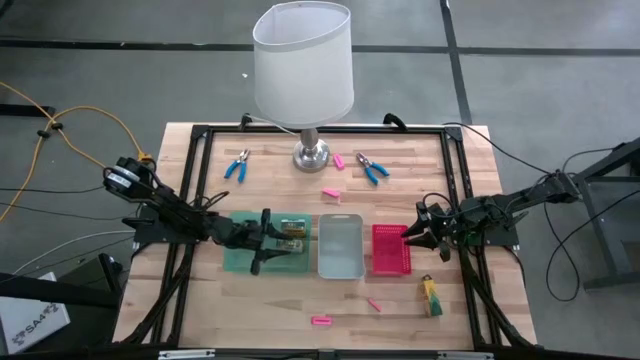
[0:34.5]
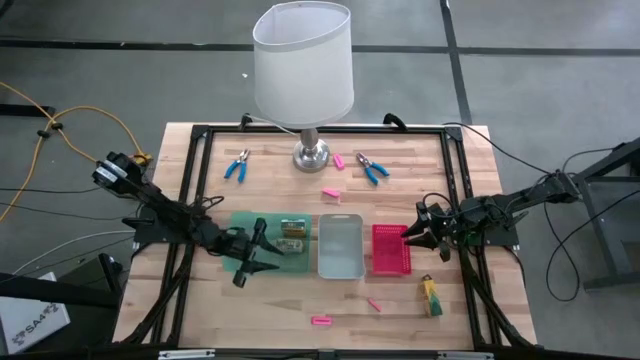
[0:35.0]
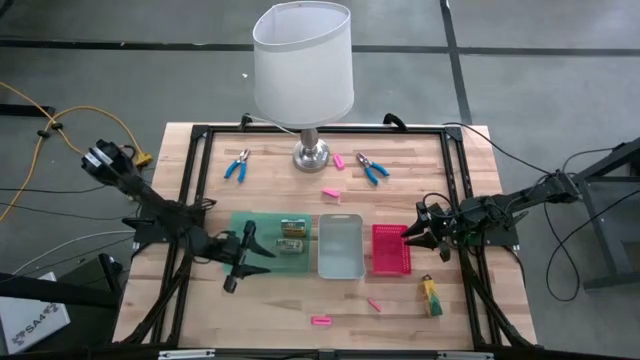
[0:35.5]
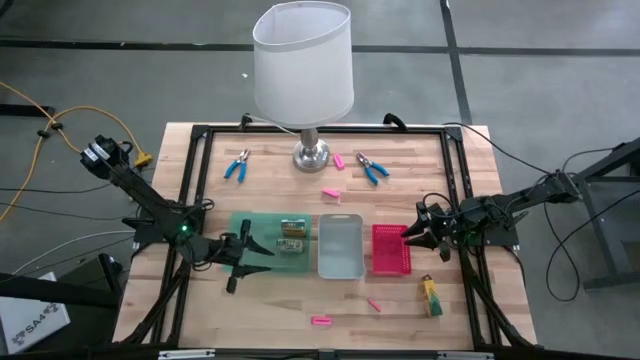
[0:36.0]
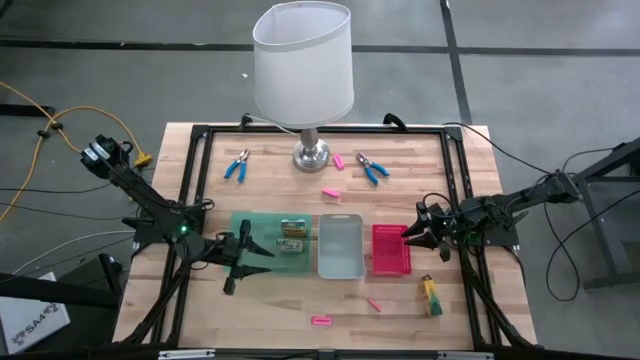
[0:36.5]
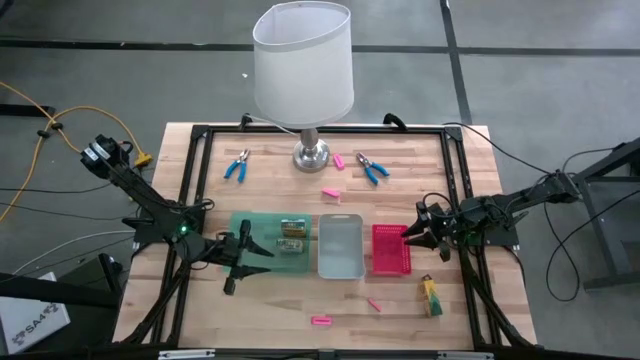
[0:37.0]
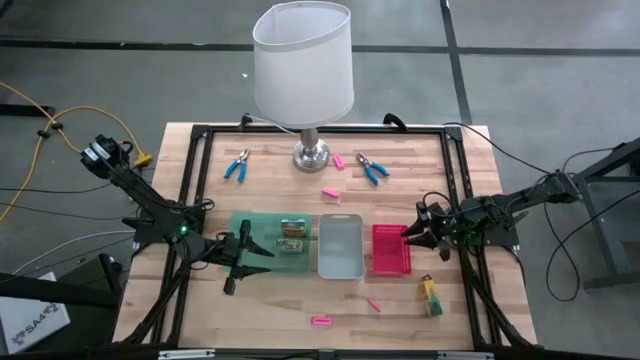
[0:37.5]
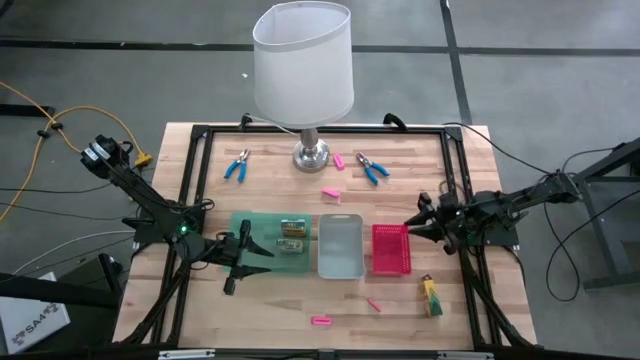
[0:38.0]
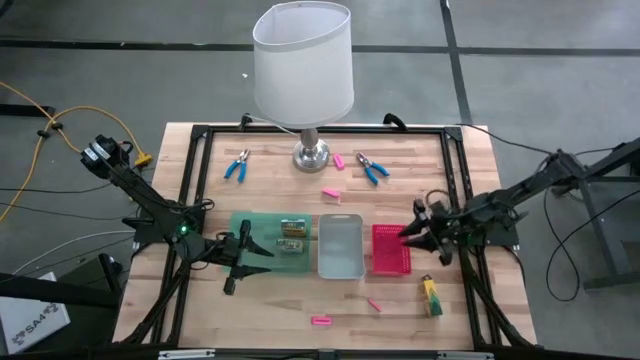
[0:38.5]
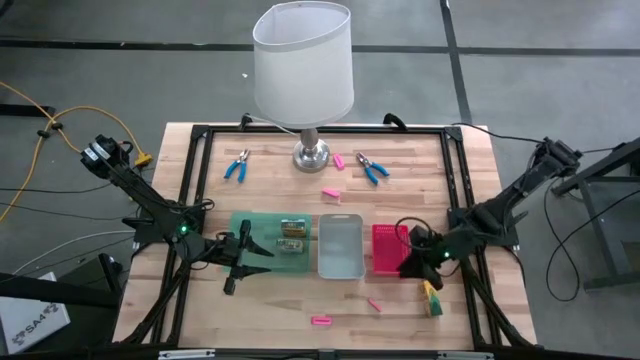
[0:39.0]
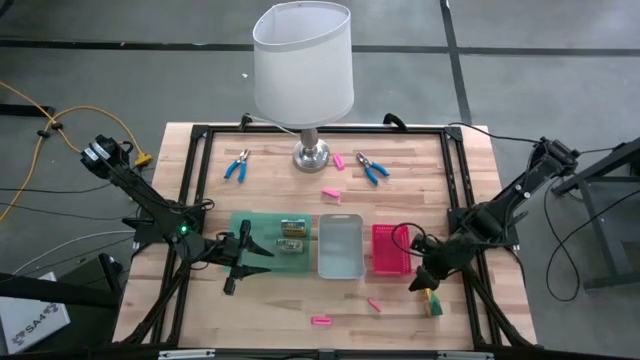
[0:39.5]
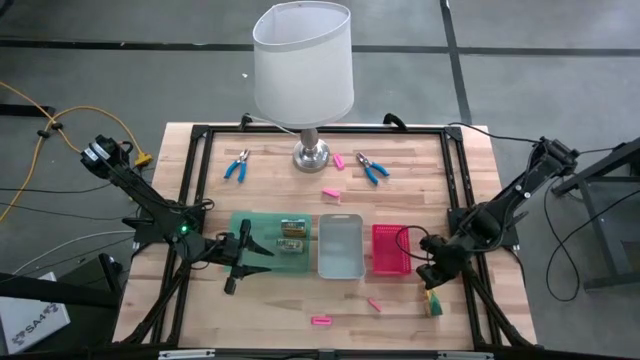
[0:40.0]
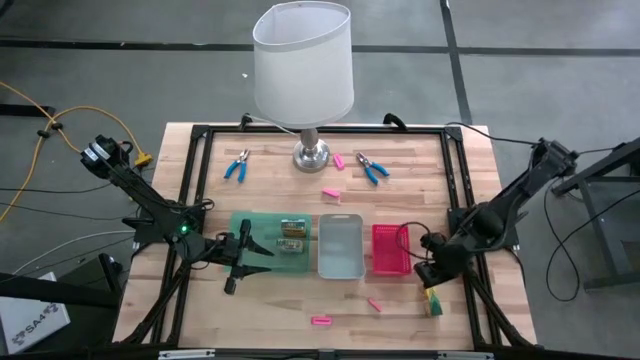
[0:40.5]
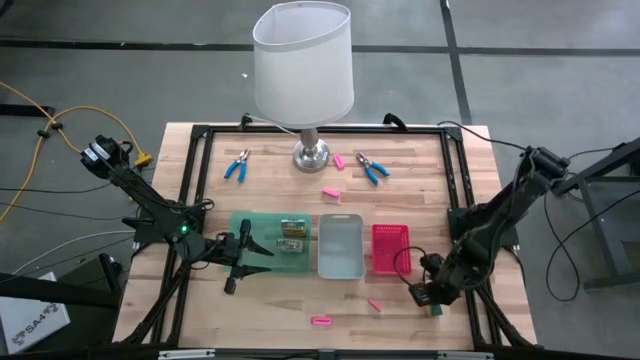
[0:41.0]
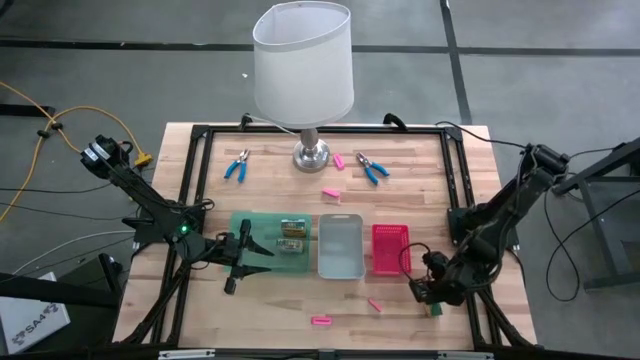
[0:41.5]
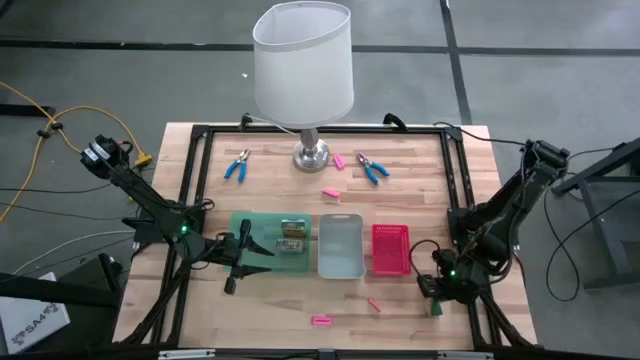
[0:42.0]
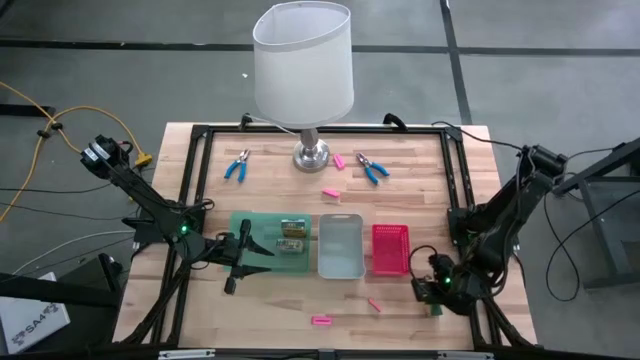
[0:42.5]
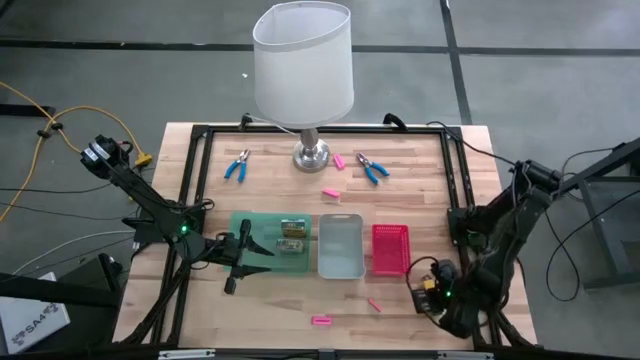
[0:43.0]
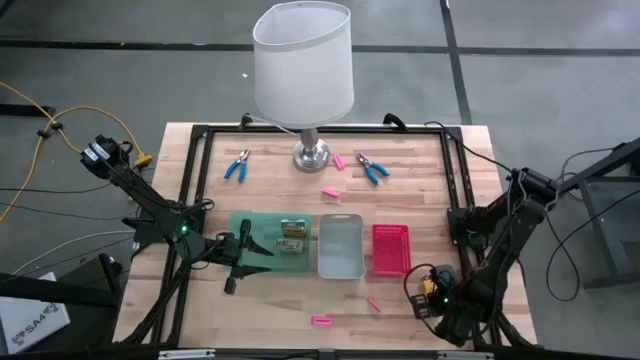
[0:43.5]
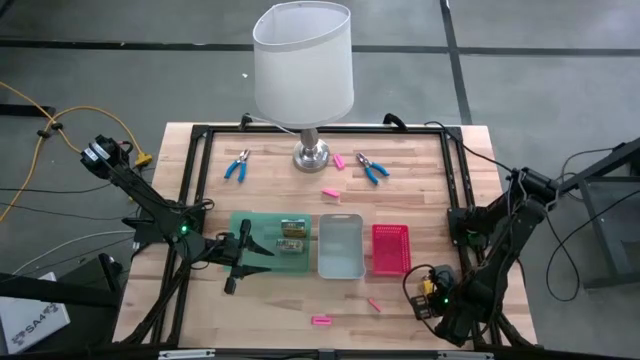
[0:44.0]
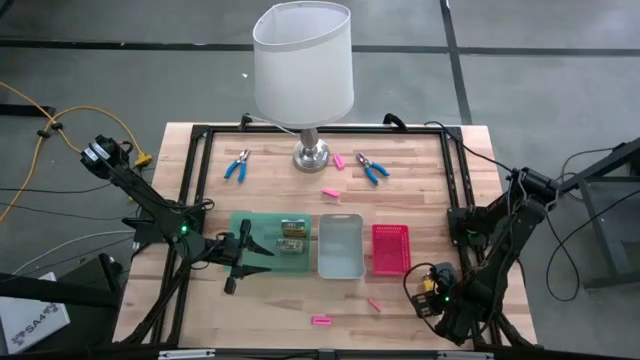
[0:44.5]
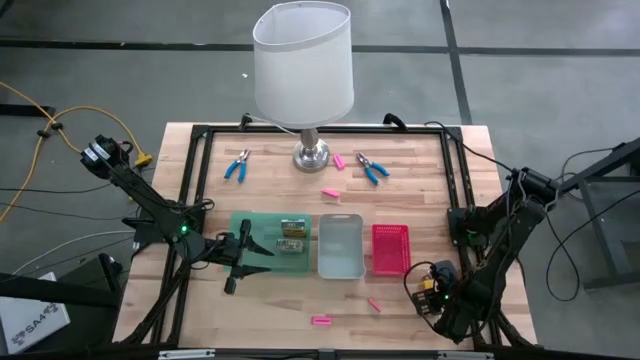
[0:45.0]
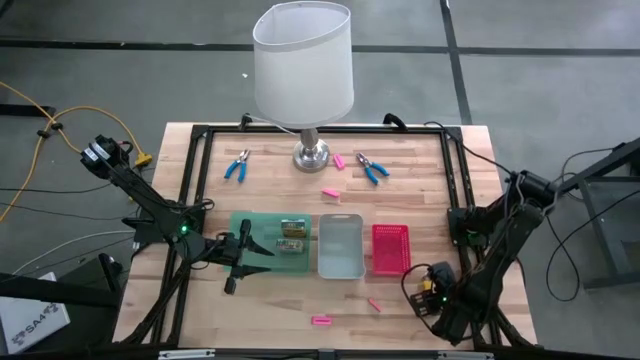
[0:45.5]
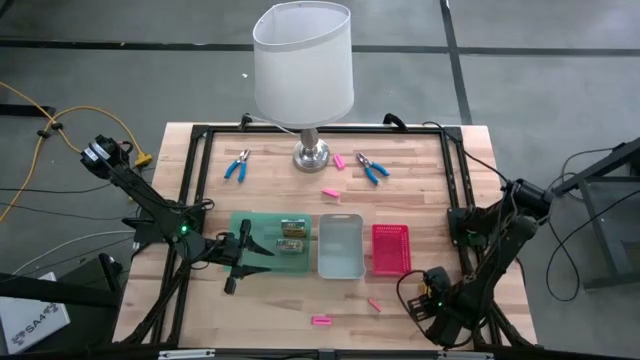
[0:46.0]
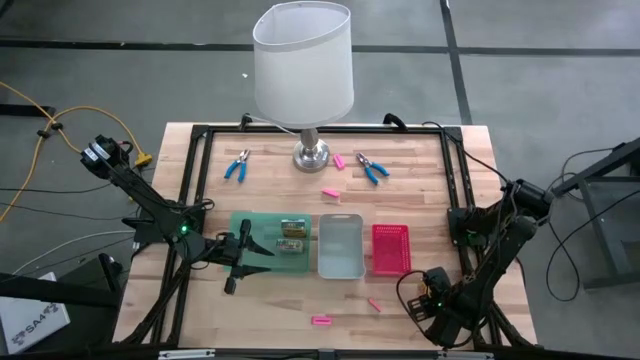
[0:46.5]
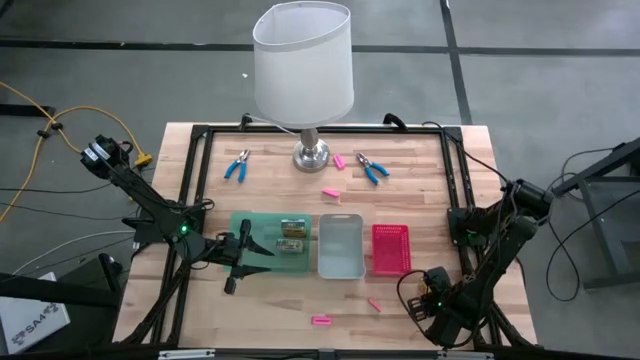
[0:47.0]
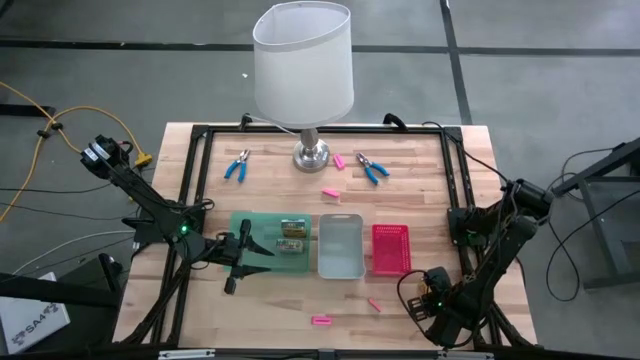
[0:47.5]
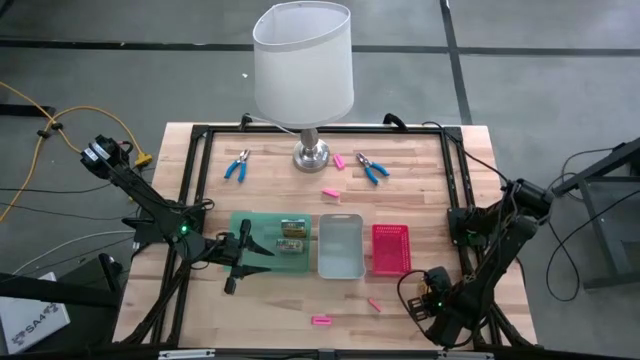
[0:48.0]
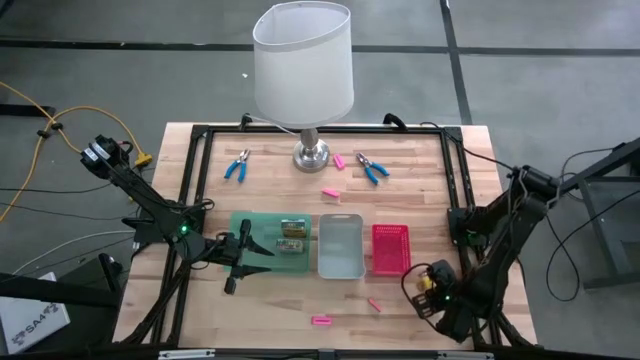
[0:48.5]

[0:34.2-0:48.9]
Task: Pick & Place School Supplies
Put the yellow box of crayons into the green bin

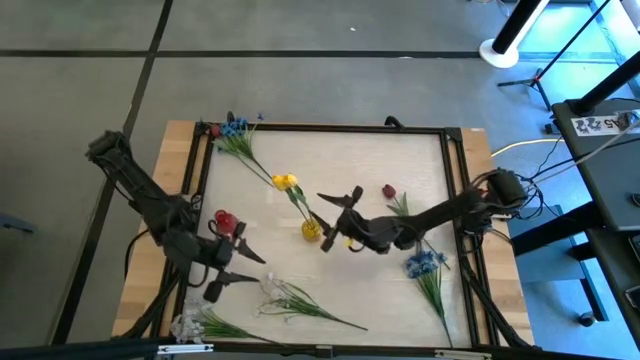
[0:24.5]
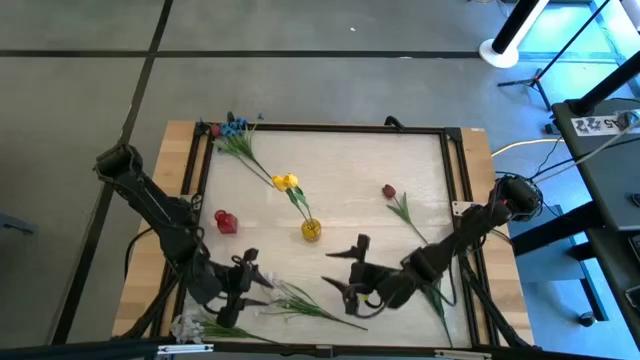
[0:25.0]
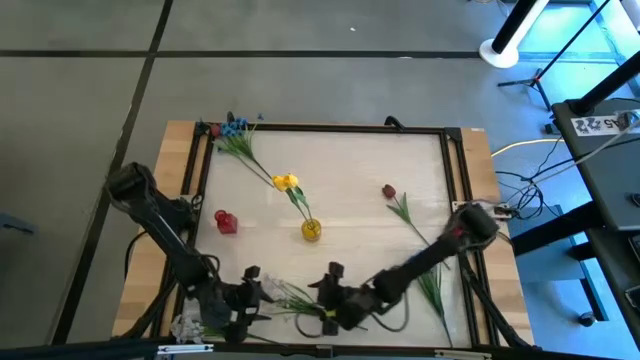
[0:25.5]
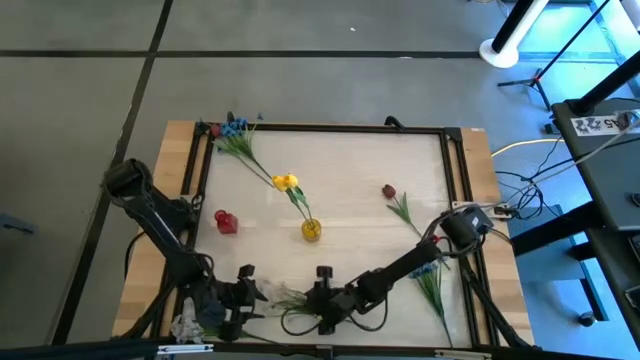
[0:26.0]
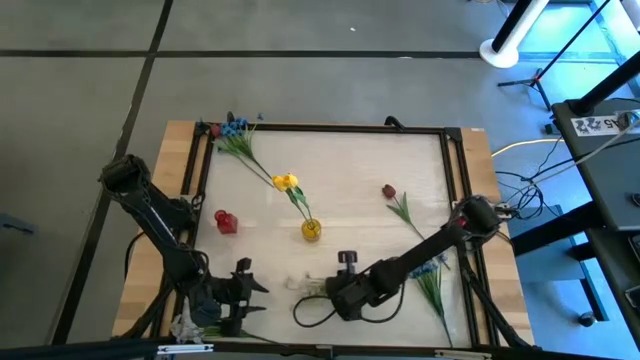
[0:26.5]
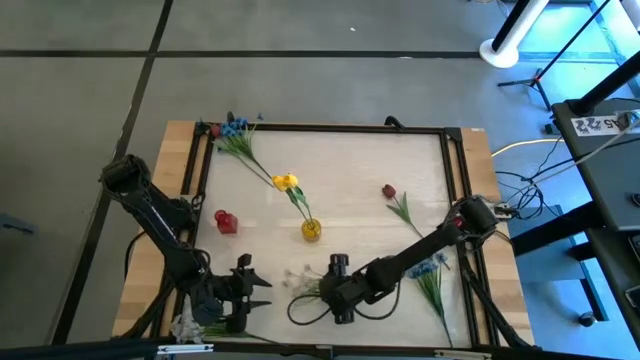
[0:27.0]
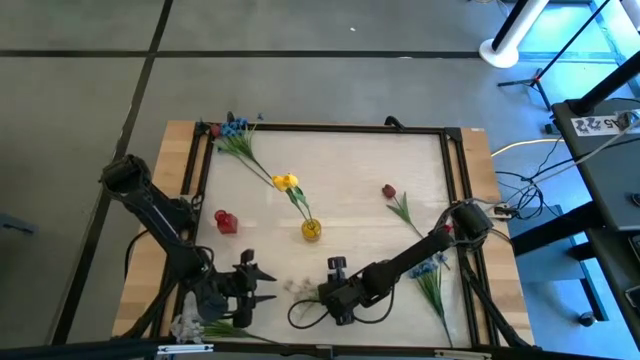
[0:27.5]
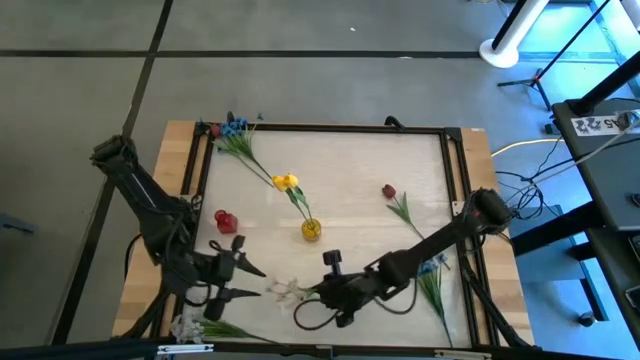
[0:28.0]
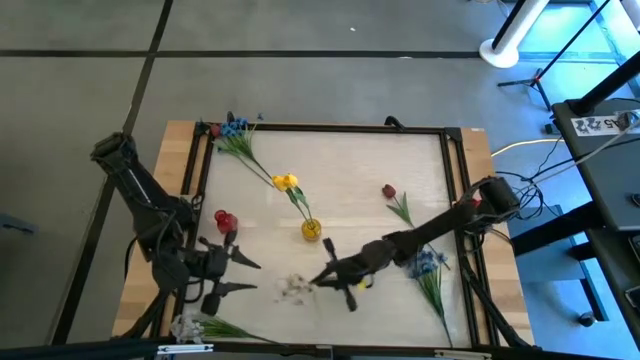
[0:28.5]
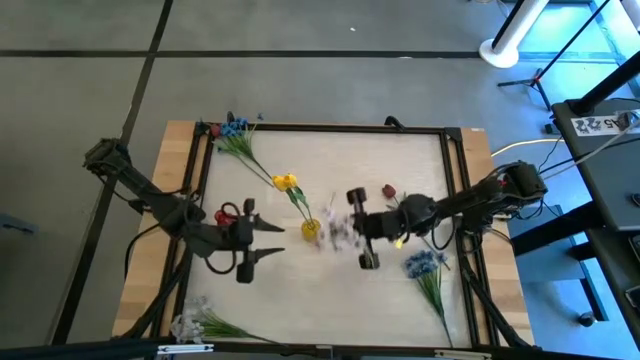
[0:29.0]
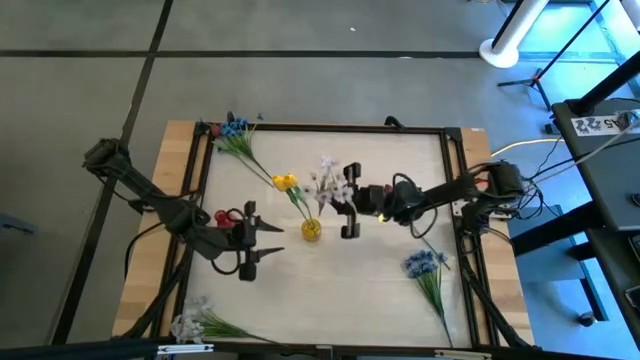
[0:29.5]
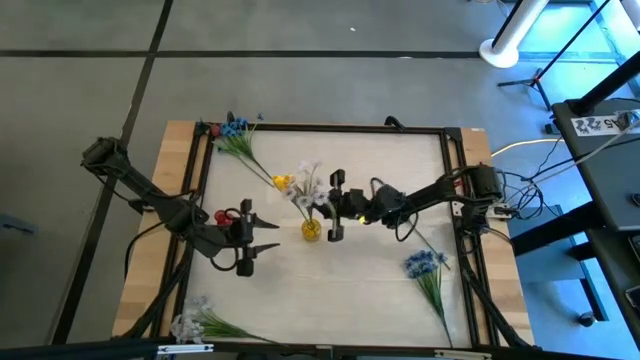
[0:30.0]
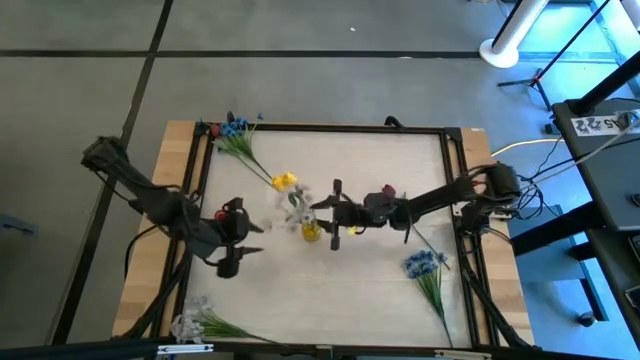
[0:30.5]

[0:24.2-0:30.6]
Task: Sort flowers into vase by color
Put the top white flowers into the yellow flower vase
